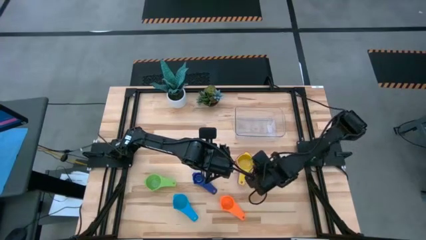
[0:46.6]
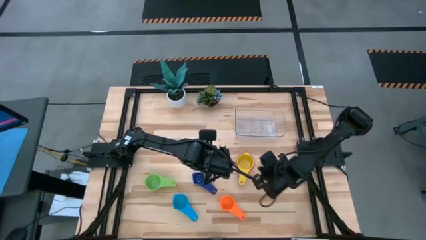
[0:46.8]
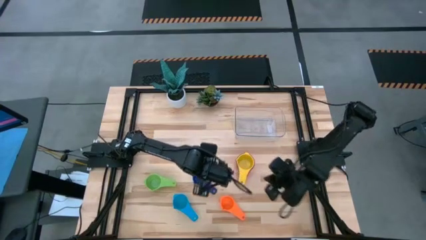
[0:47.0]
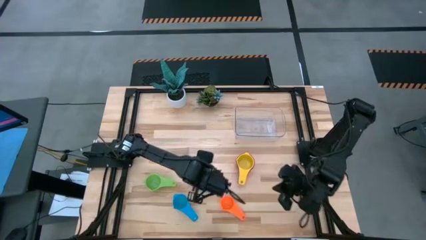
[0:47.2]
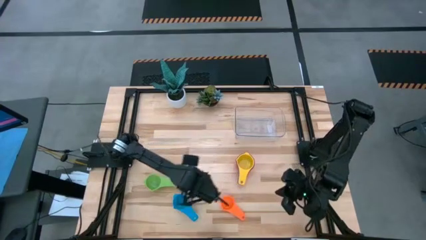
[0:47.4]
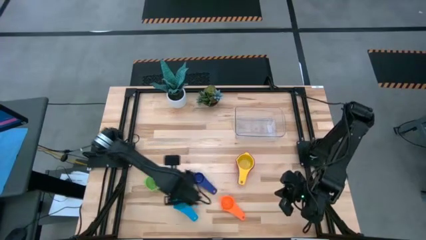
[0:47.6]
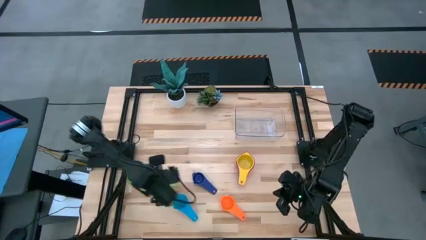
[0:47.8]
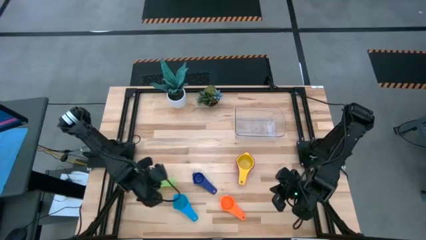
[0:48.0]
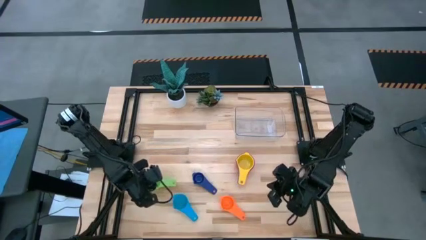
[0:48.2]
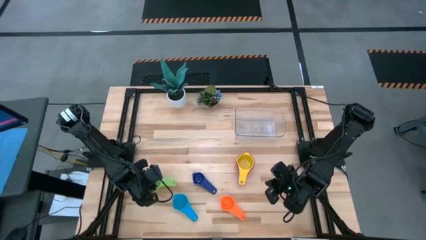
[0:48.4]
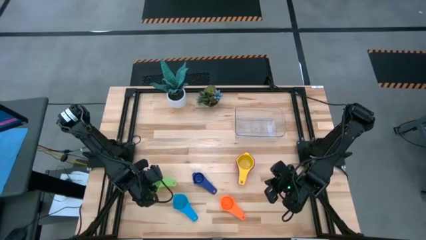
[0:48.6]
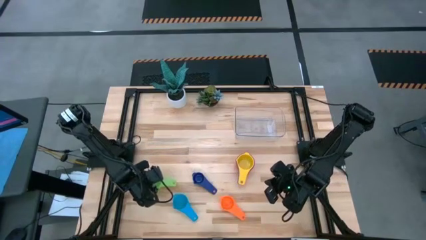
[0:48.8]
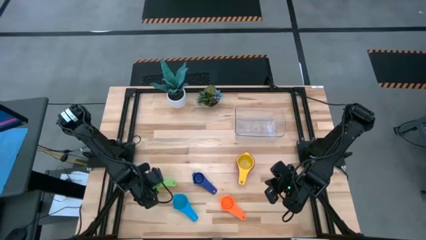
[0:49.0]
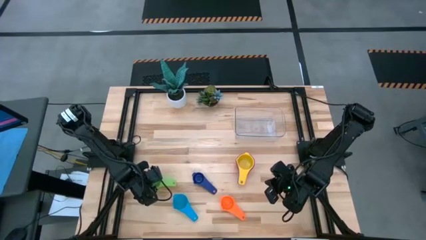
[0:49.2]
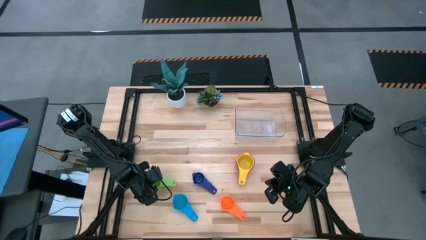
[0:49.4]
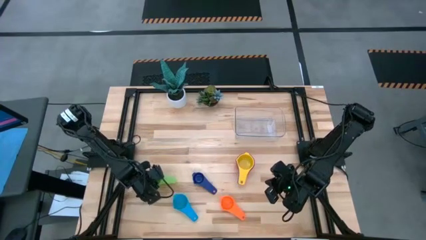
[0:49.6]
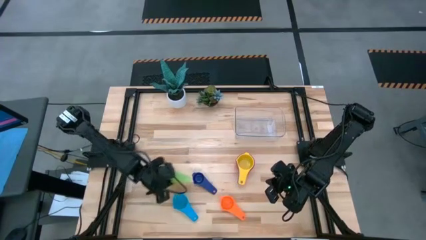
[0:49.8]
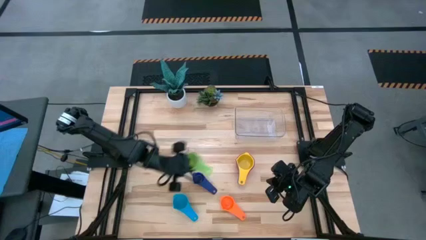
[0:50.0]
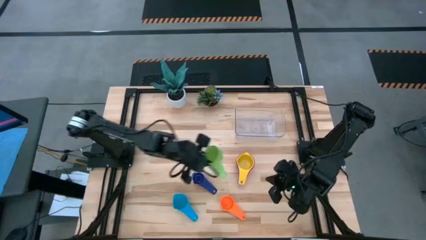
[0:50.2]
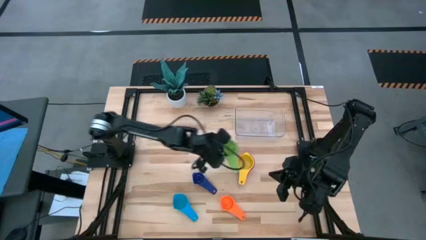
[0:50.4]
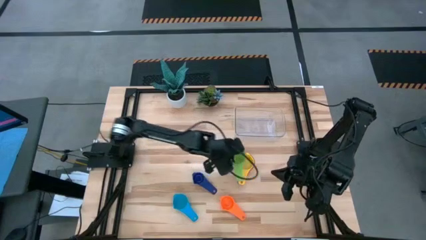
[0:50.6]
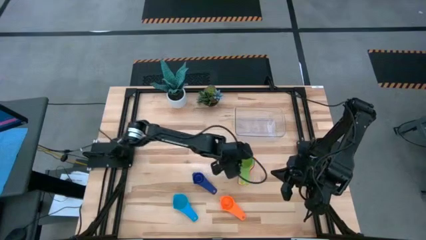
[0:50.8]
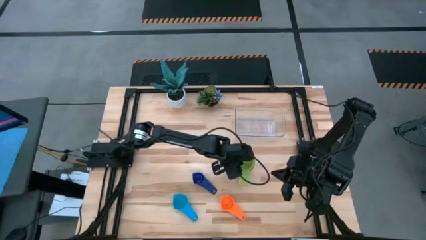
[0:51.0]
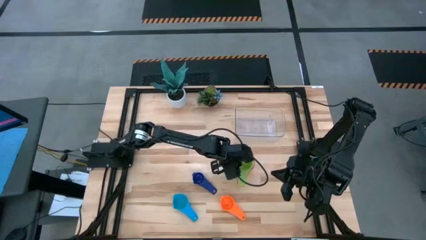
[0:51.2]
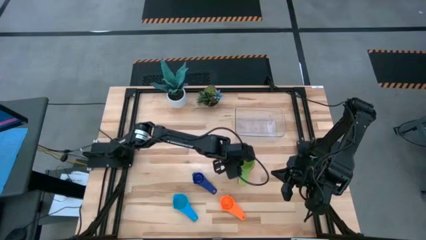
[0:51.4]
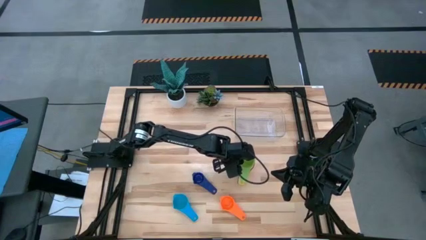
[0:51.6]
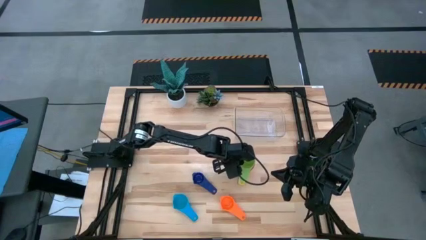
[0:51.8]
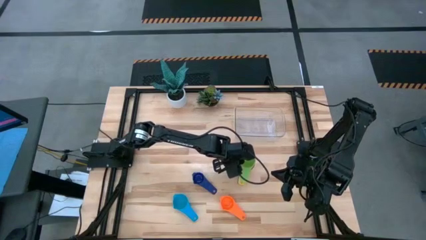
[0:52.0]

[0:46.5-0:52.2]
Task: Nest measuring cups in basket
Stack the green measuring cup on top of the yellow measuring cup

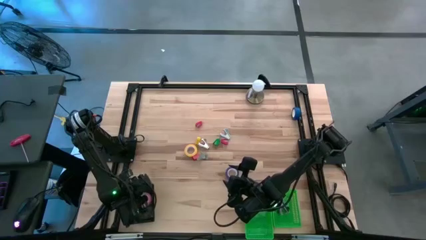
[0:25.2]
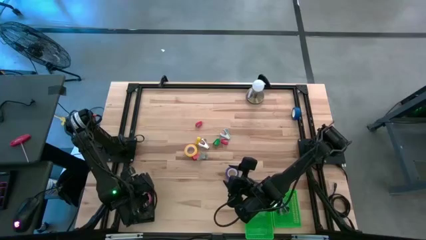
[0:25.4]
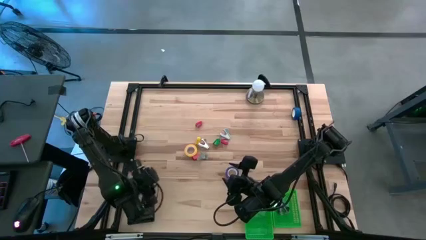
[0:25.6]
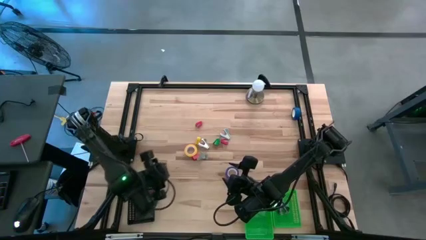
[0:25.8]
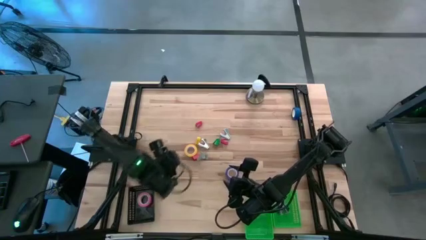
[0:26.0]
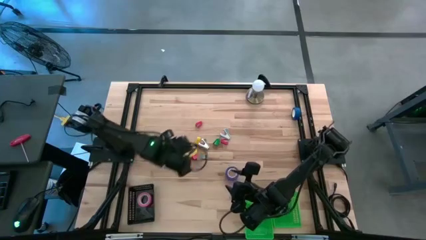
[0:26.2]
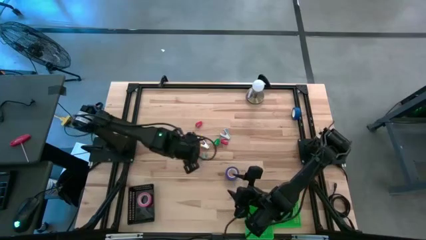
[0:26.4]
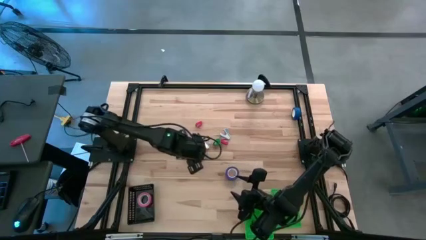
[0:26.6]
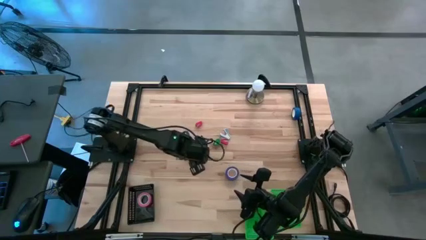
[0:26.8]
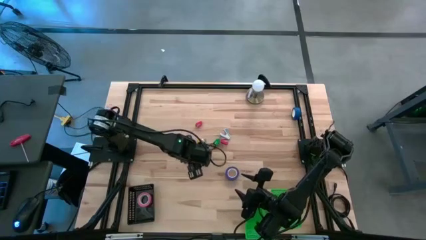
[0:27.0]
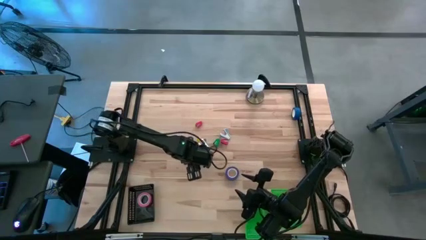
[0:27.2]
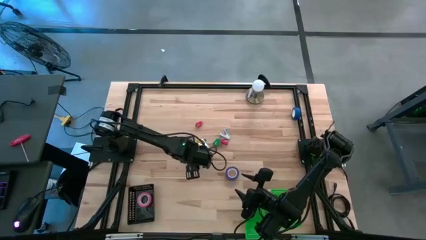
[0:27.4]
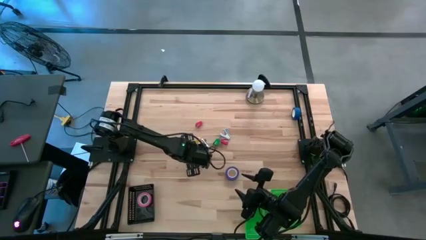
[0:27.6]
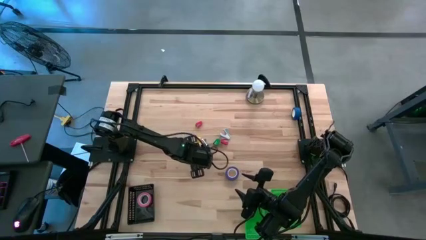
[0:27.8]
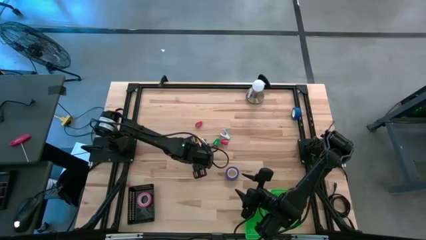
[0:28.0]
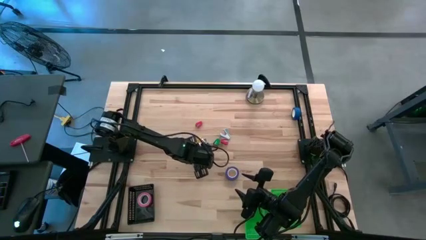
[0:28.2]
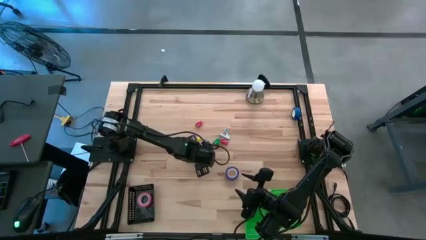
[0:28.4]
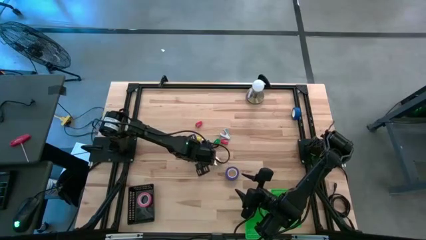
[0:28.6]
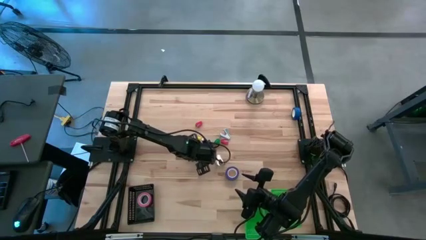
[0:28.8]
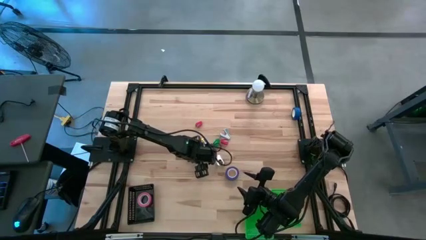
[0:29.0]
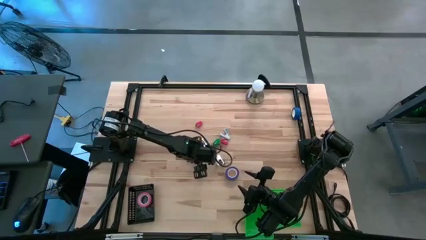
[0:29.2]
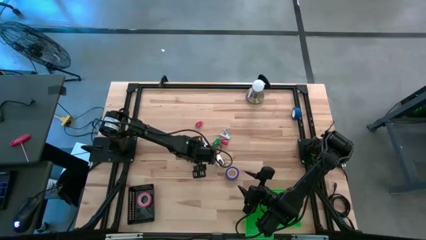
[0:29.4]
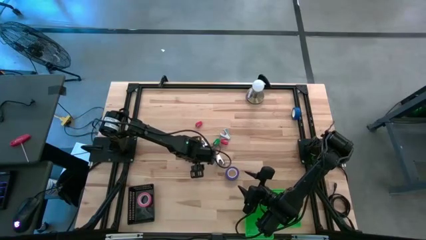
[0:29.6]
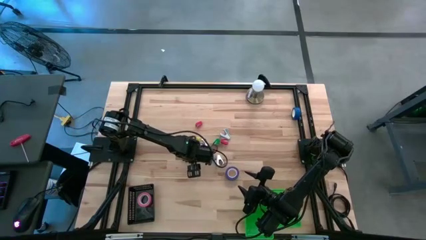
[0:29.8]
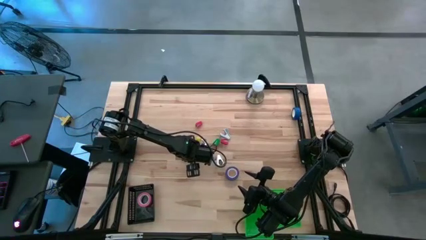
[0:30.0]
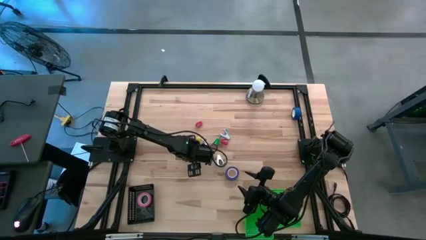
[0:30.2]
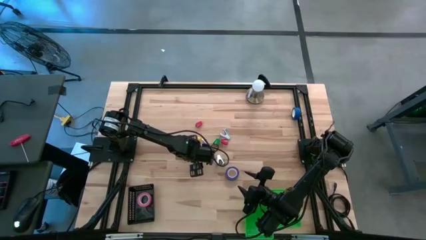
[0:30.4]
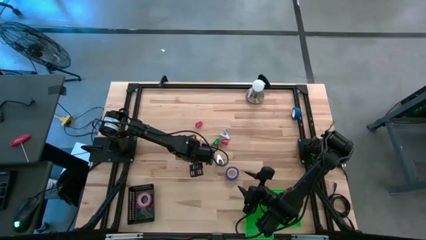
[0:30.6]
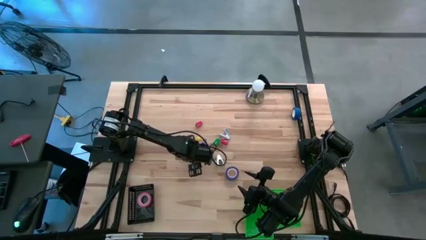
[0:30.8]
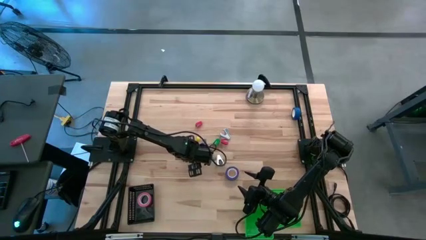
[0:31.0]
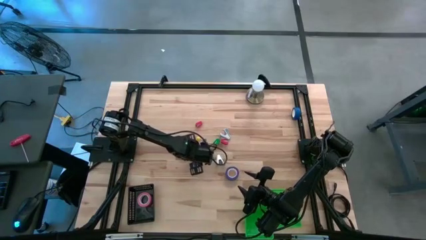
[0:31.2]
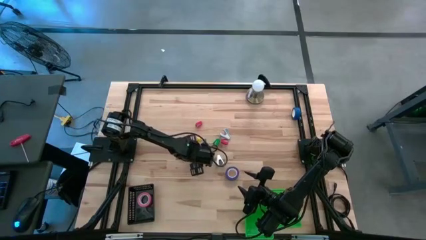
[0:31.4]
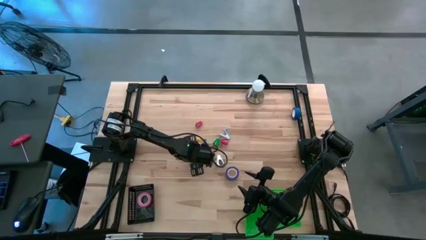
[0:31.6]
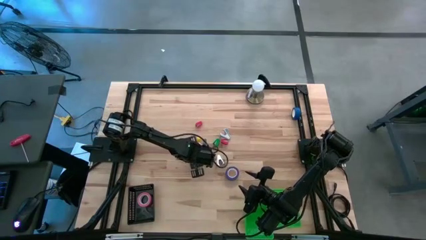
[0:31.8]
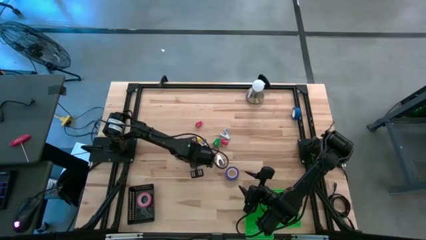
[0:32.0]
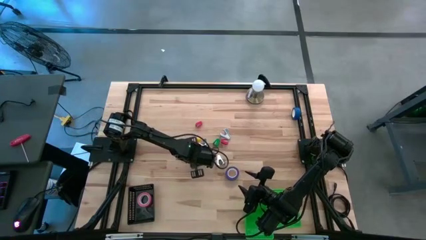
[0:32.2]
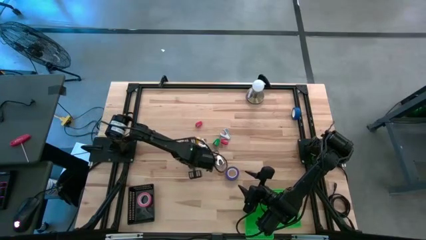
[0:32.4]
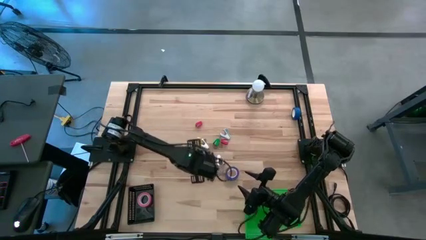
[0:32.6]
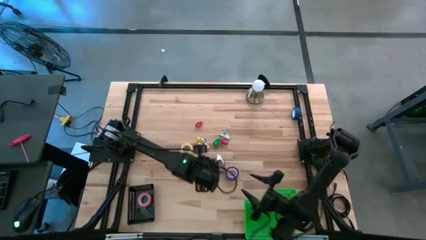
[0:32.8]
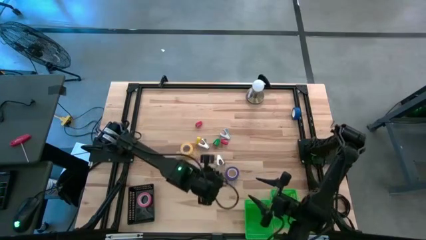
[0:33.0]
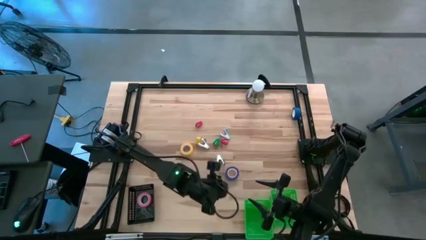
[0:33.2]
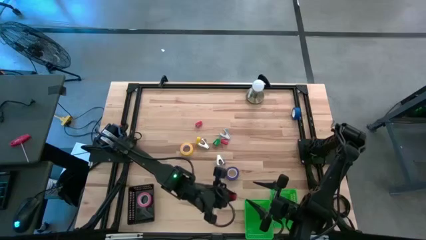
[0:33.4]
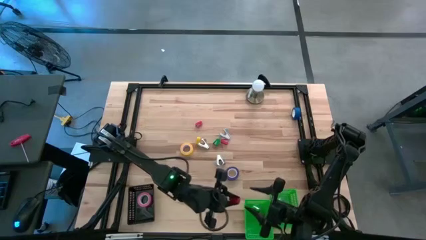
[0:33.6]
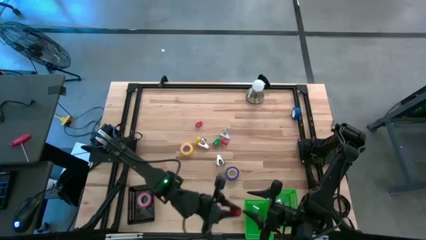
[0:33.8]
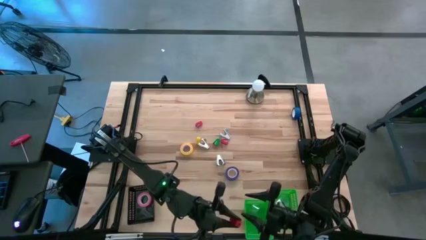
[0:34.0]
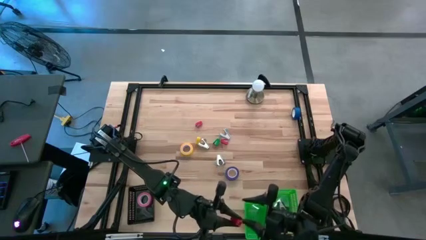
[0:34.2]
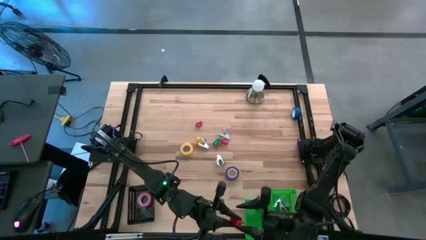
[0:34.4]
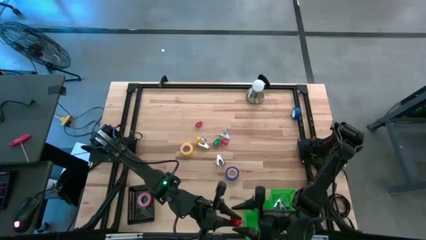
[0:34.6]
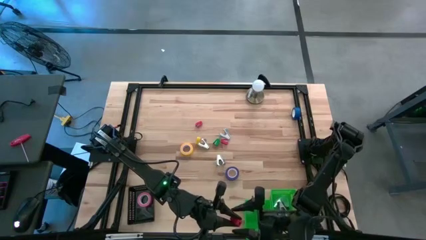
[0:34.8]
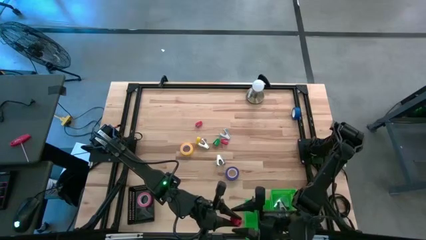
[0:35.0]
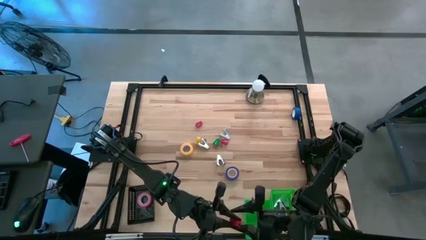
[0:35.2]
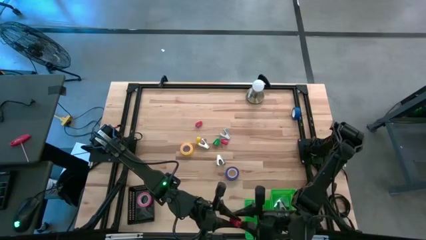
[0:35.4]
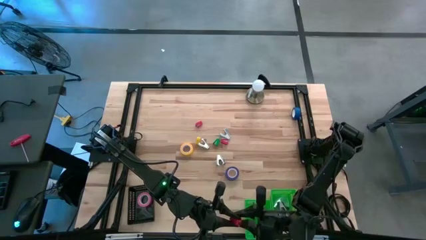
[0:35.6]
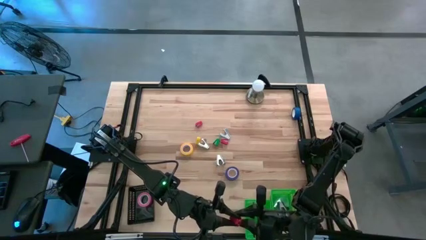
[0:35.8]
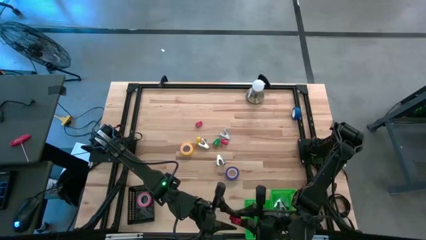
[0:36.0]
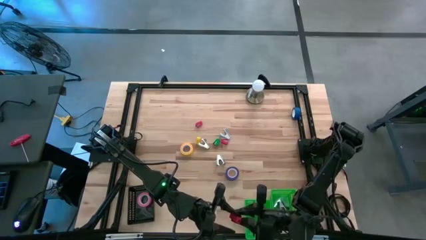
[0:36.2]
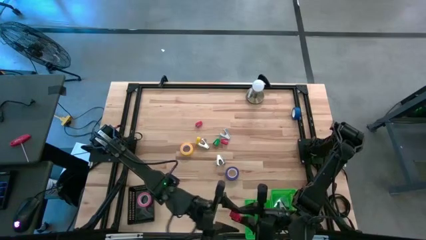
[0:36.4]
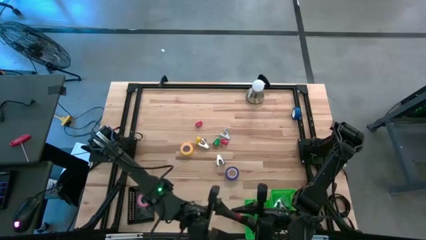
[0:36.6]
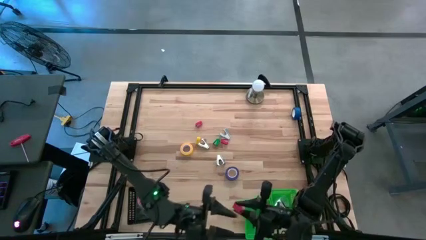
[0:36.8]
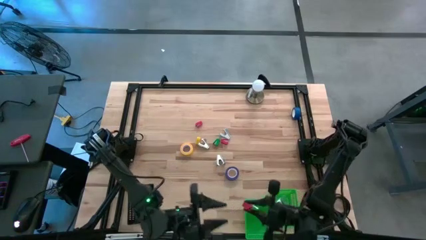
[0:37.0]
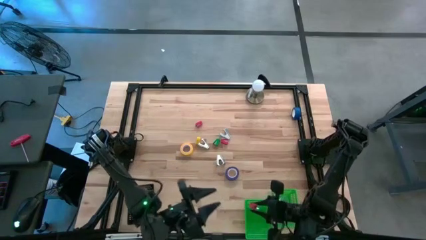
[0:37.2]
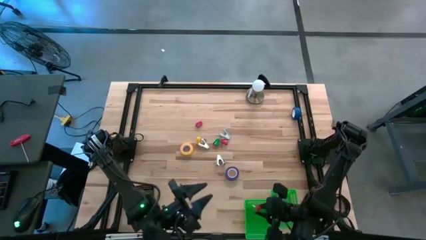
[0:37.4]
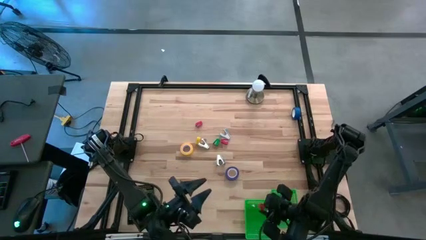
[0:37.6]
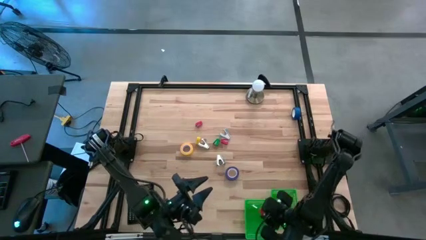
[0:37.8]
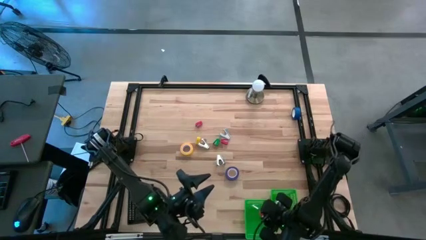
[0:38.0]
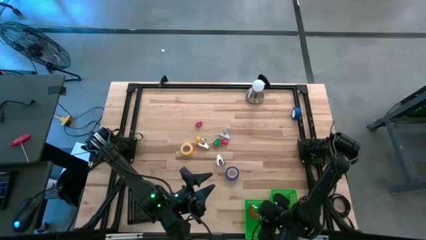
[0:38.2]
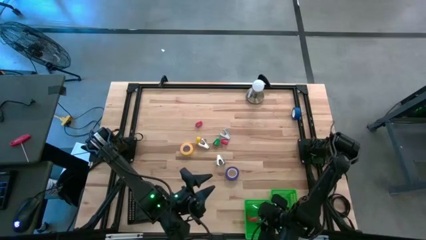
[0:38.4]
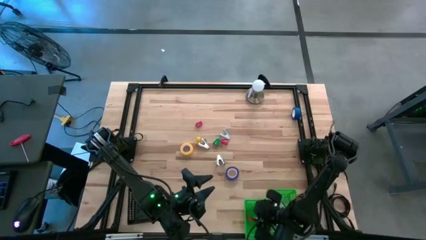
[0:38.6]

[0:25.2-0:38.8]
Task: Pick and place Stapler, Stapler remover, tape
Put the red stapler into the left green bin
